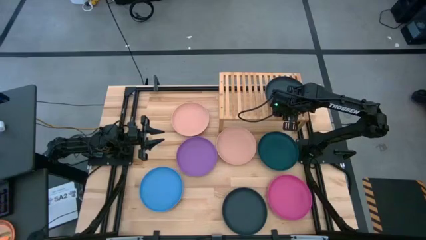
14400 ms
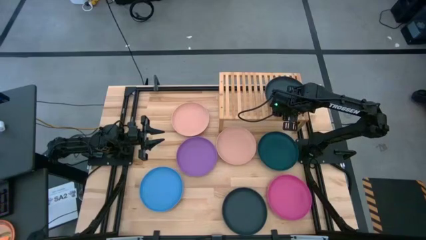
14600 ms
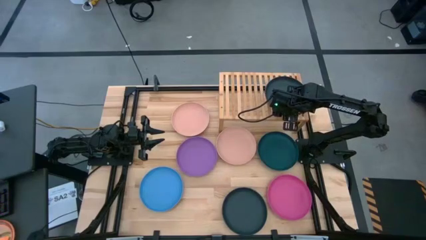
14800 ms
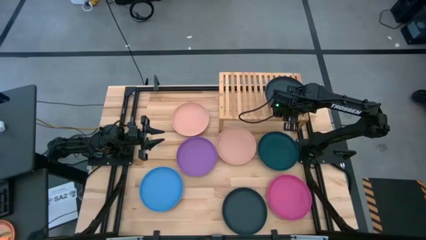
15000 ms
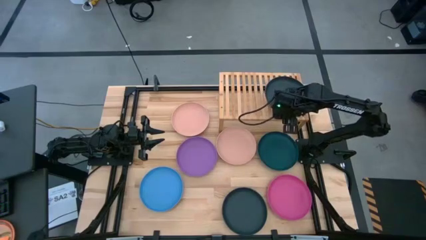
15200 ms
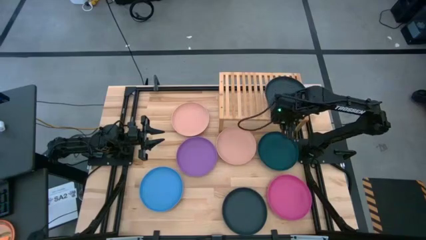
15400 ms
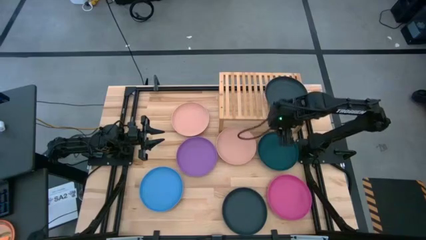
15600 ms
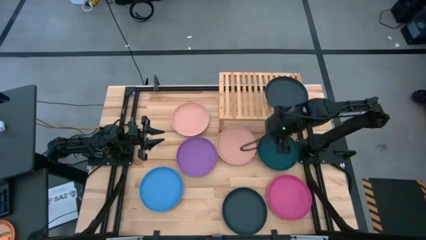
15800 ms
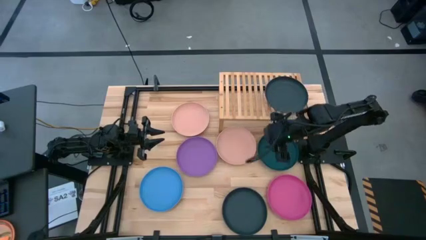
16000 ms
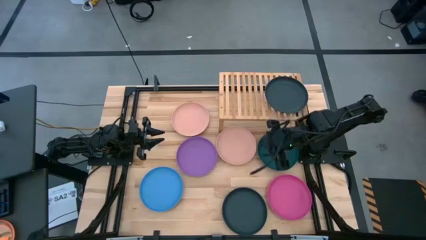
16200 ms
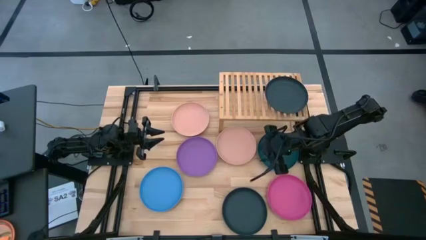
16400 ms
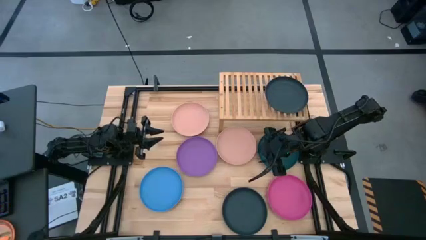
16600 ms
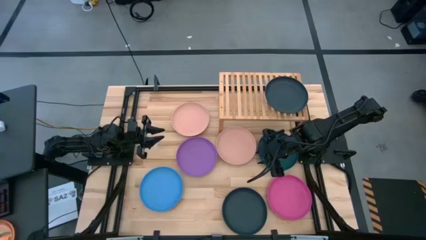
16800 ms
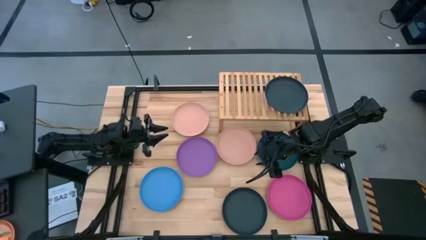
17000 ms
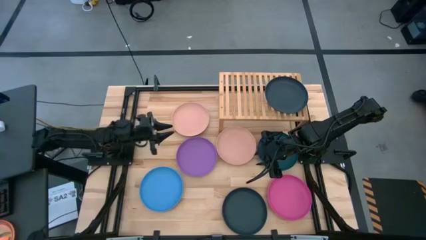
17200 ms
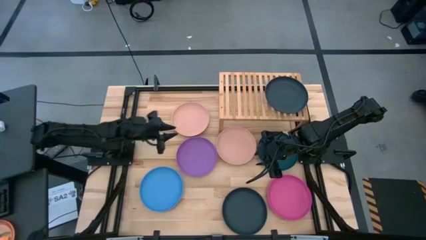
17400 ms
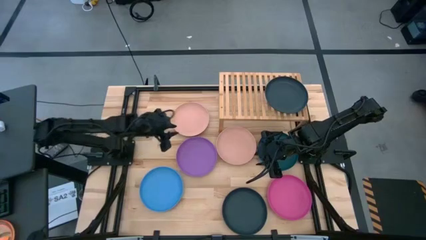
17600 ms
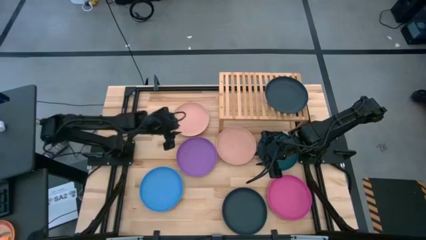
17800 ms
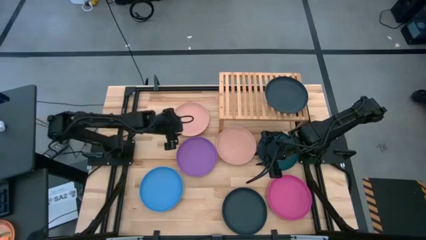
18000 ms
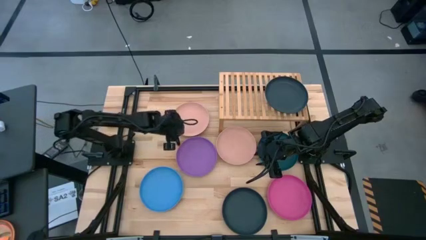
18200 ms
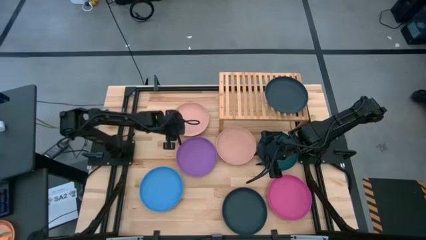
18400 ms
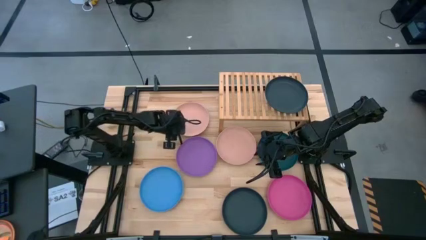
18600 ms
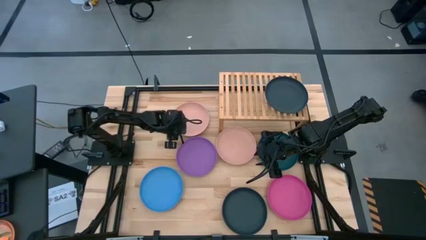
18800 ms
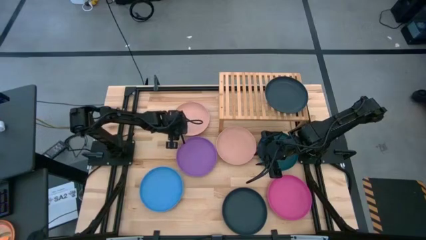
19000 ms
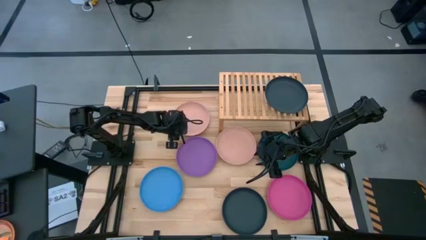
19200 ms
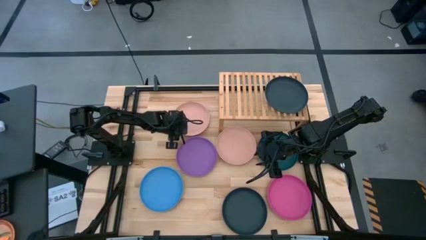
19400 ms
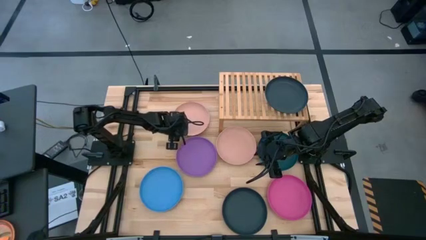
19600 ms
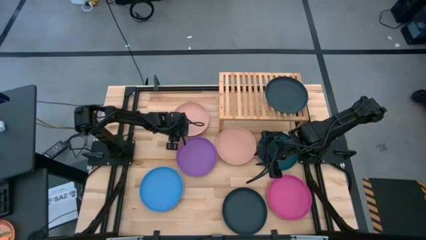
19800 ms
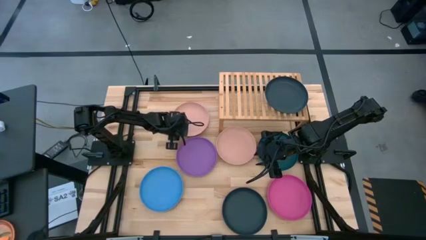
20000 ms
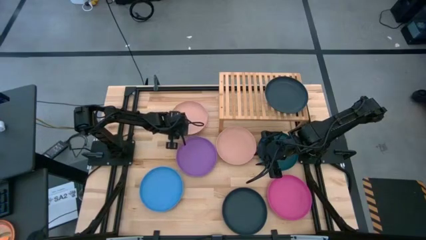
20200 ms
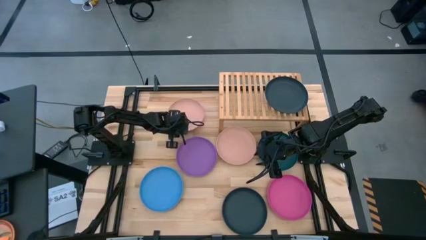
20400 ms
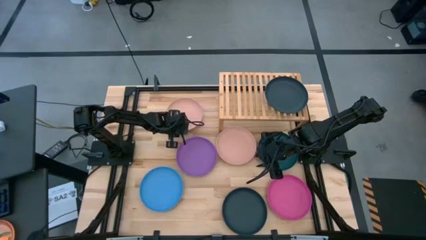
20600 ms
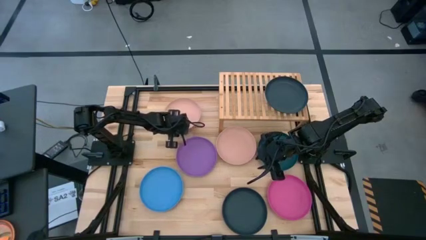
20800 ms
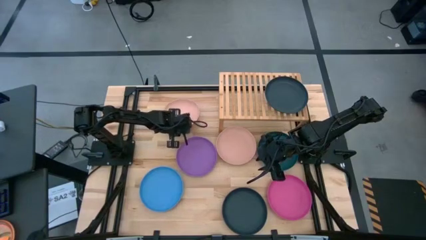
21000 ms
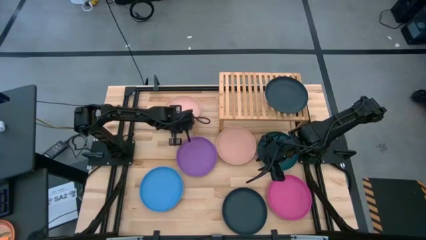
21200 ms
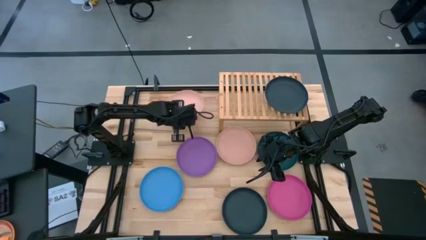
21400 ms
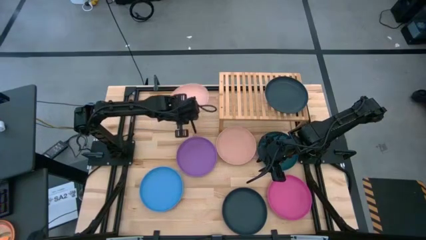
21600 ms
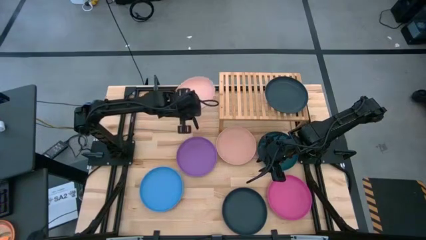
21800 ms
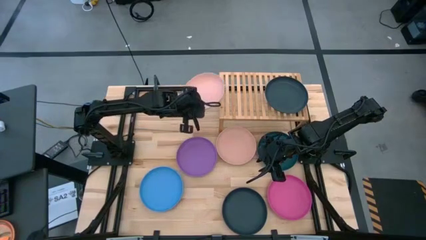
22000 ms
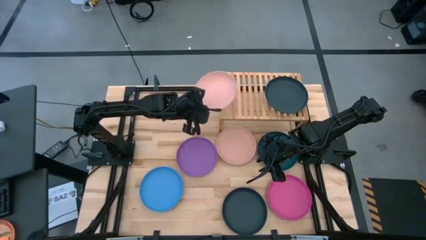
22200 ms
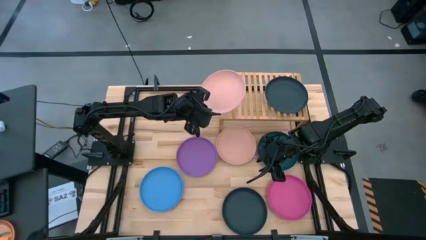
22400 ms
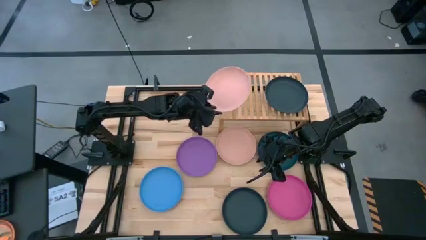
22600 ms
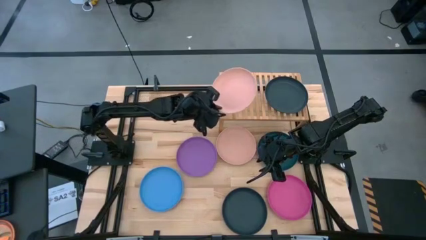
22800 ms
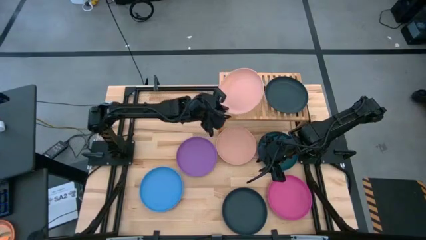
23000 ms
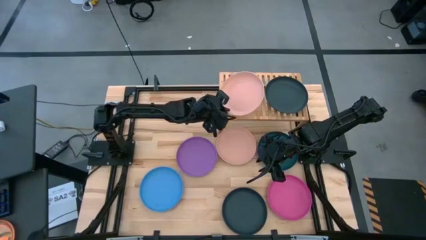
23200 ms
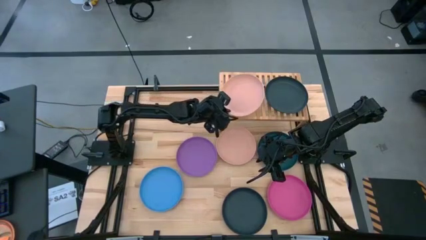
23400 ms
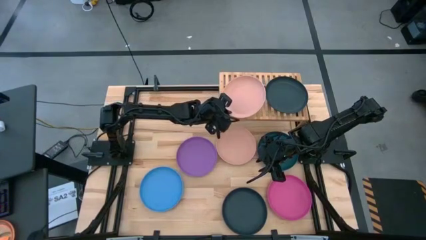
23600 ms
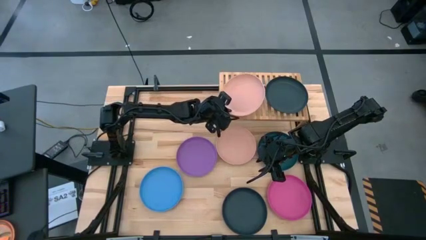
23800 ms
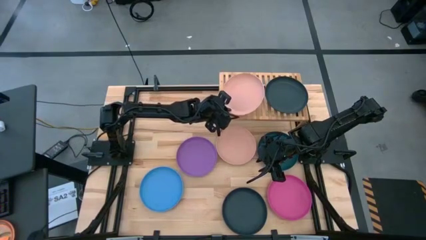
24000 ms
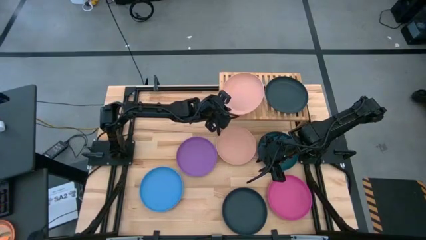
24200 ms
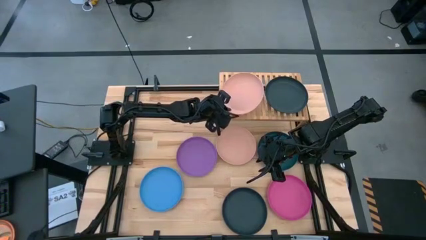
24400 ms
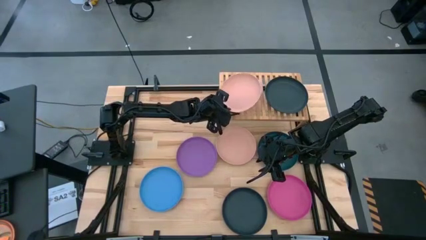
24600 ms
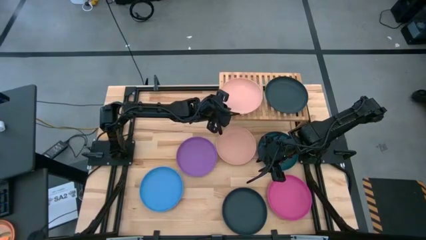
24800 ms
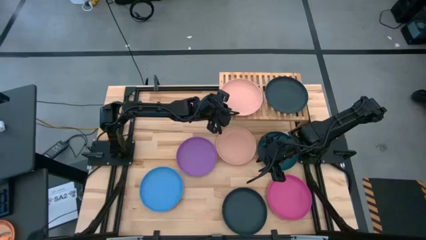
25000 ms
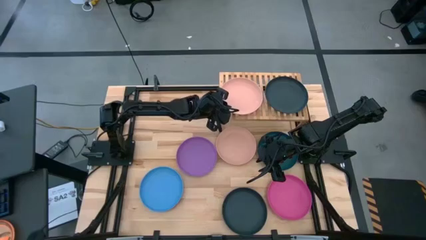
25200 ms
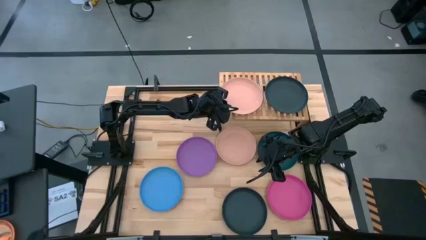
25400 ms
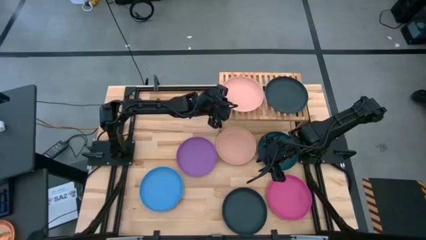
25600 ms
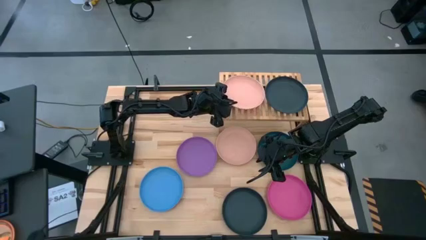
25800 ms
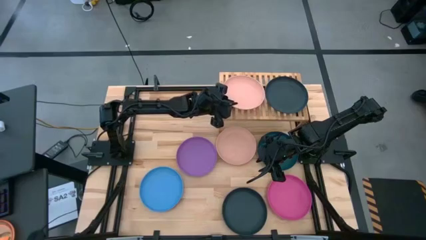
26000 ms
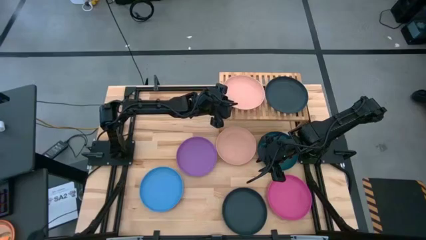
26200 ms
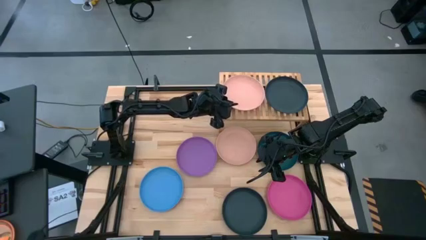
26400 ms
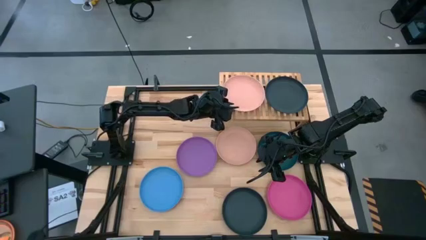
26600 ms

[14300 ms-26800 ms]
Task: Place and stack plates onto a shelf
Put the left light orange plate on the shelf
